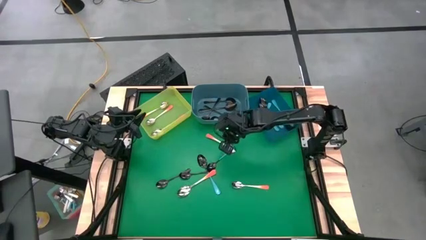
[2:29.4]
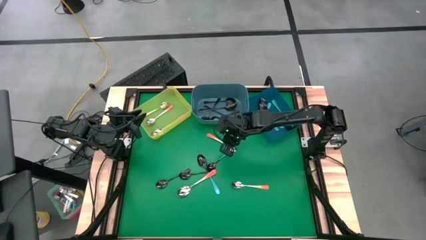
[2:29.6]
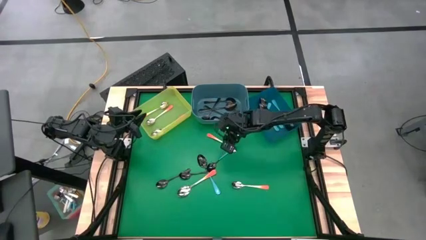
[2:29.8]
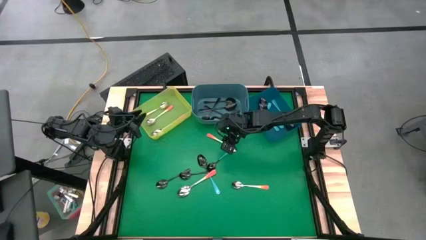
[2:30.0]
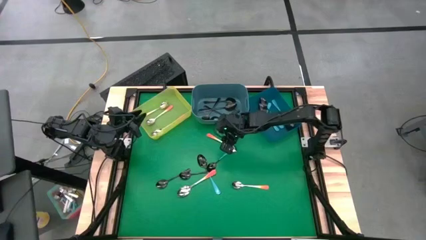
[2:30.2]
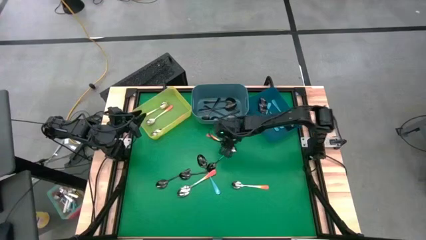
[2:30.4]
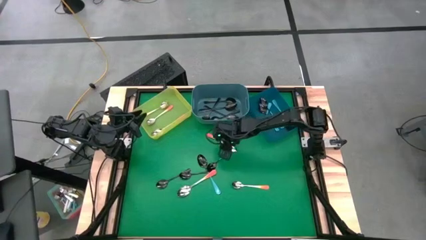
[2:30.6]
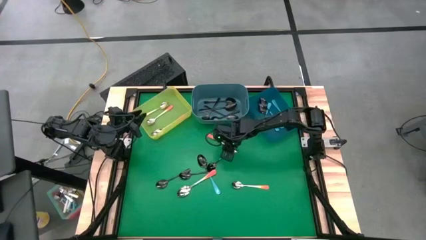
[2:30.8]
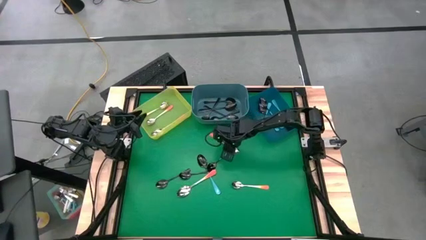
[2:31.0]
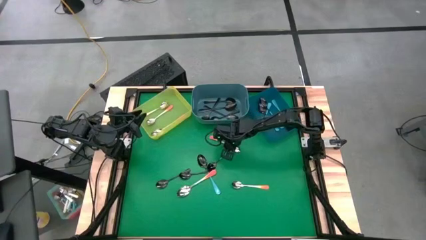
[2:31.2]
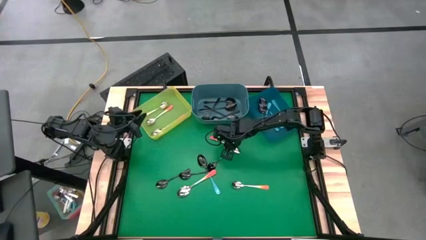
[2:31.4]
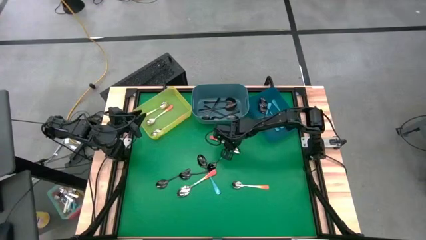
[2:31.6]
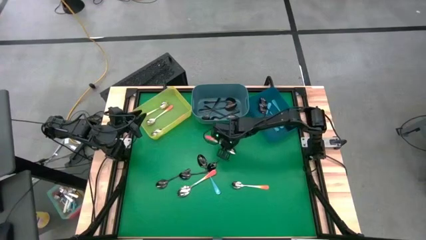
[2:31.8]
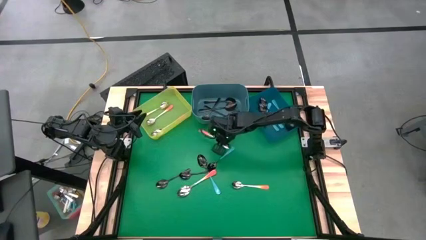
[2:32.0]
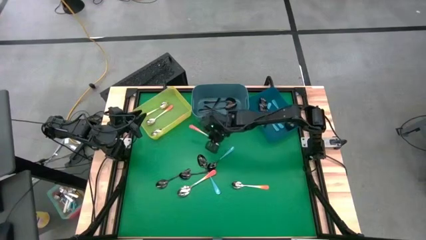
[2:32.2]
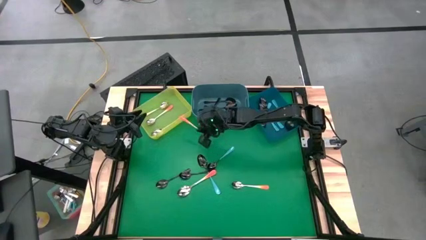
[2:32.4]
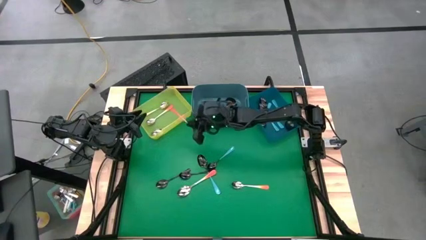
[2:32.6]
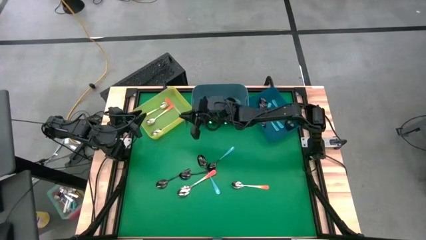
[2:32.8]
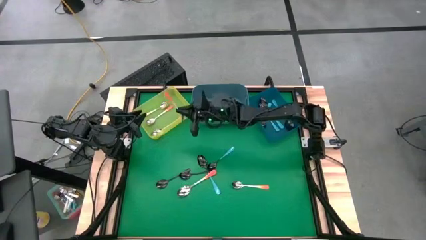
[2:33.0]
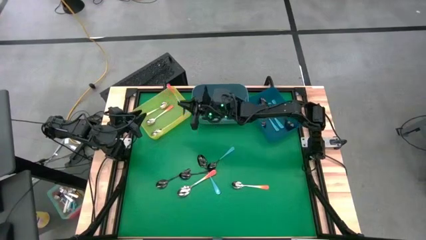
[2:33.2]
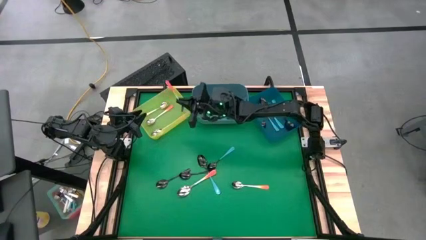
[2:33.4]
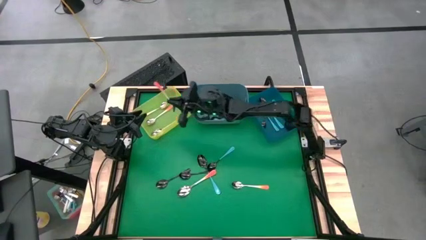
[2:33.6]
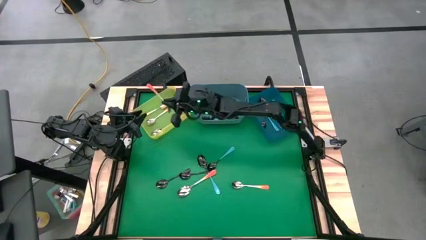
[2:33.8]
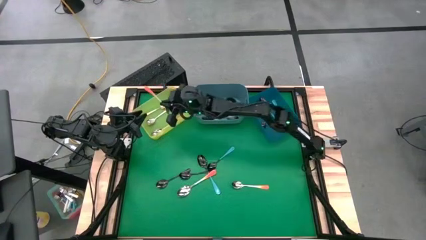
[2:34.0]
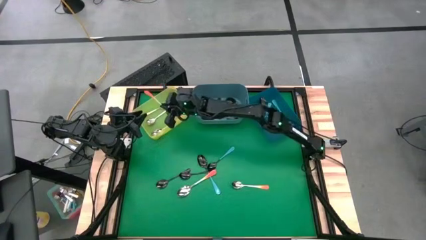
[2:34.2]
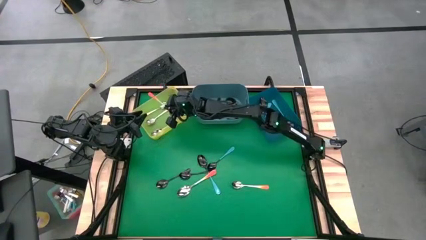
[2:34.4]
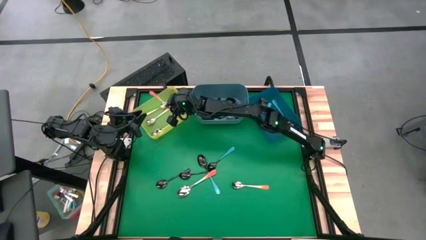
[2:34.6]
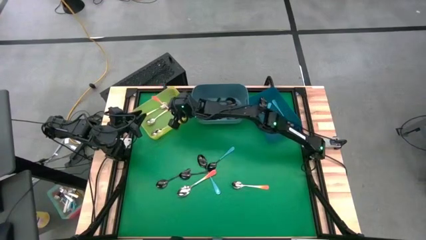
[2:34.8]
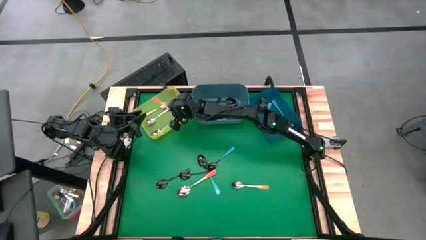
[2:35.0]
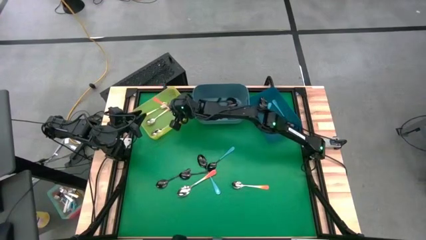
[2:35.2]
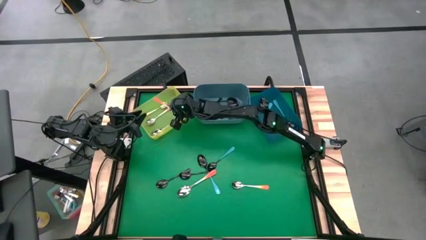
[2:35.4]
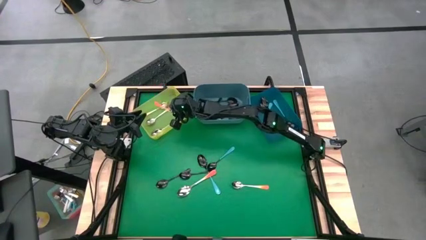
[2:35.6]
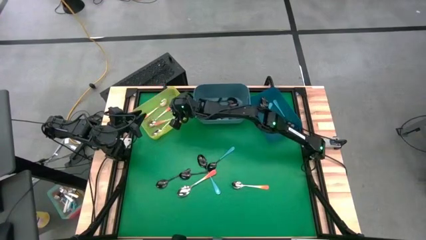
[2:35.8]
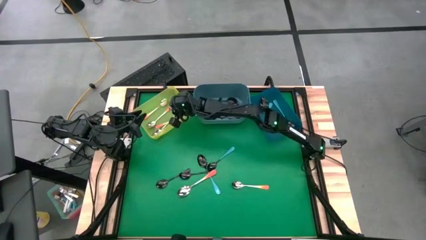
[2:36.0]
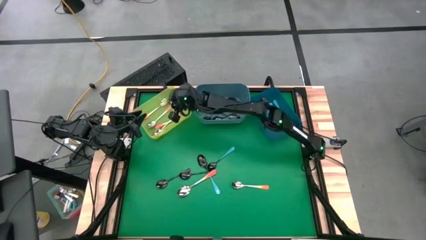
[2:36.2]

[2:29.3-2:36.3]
Task: Sort silverware by color (type)
Put the orange spoon into the yellow bin

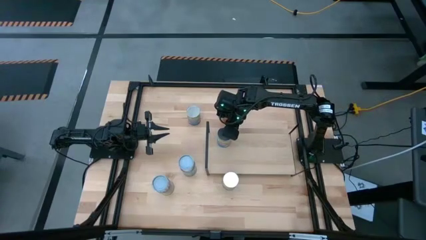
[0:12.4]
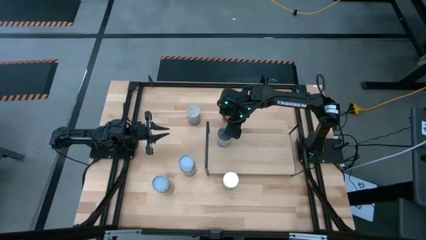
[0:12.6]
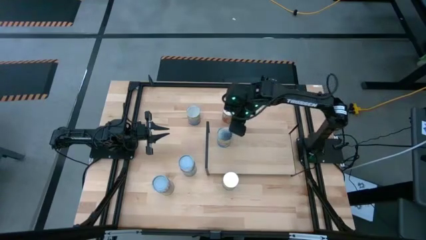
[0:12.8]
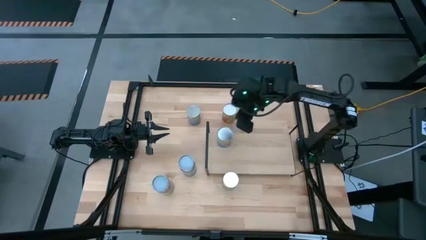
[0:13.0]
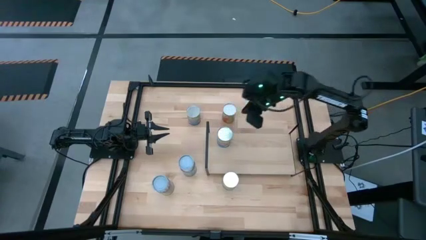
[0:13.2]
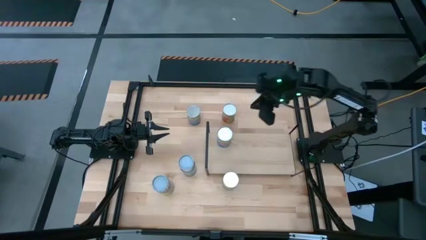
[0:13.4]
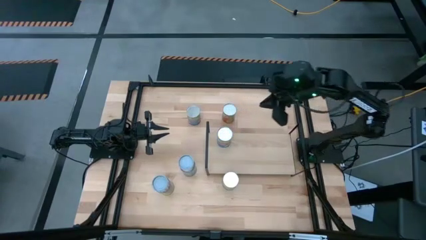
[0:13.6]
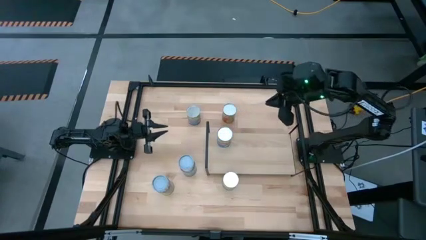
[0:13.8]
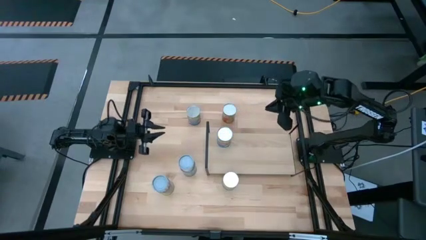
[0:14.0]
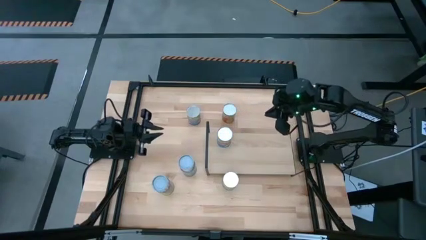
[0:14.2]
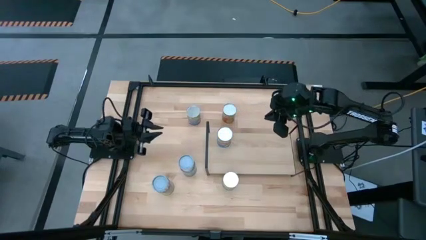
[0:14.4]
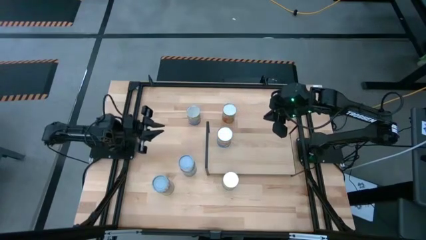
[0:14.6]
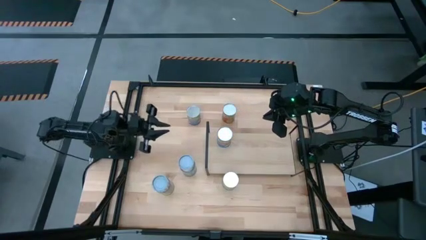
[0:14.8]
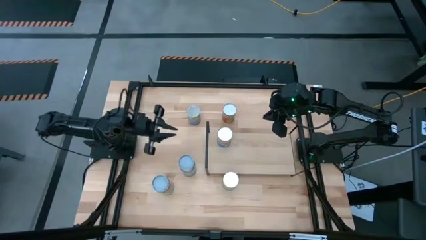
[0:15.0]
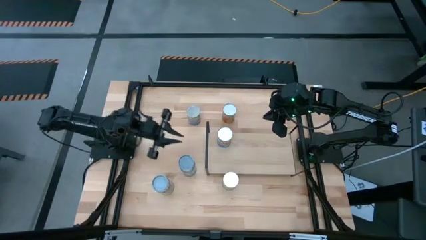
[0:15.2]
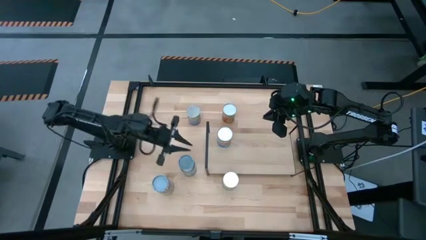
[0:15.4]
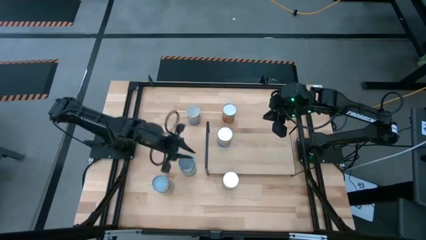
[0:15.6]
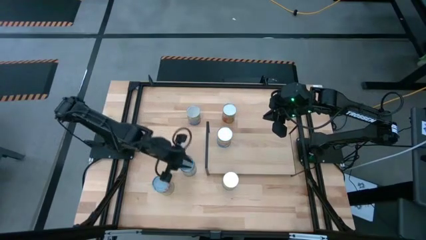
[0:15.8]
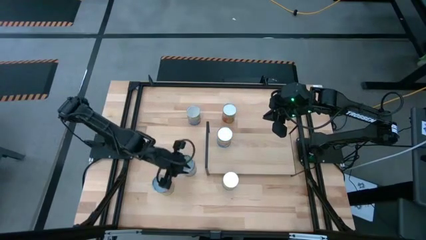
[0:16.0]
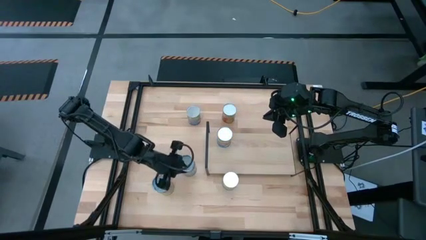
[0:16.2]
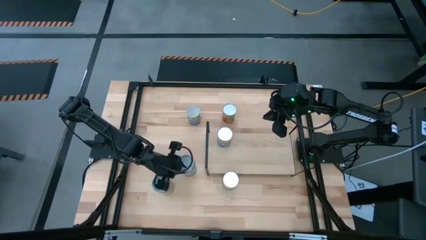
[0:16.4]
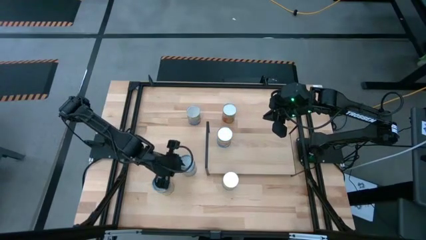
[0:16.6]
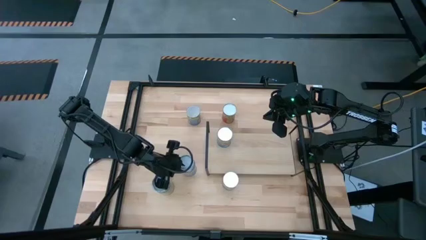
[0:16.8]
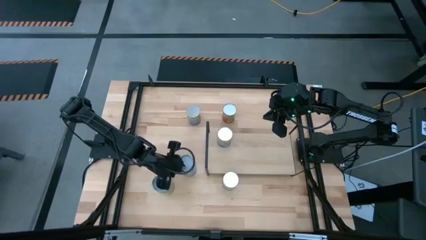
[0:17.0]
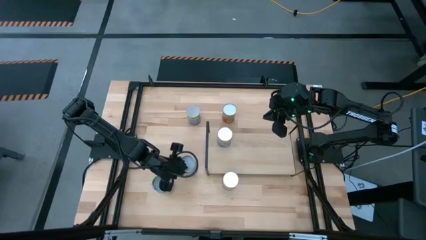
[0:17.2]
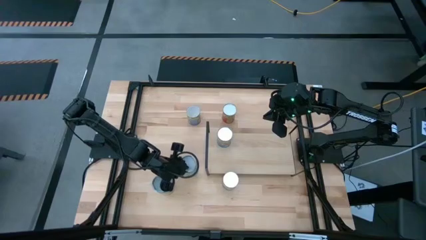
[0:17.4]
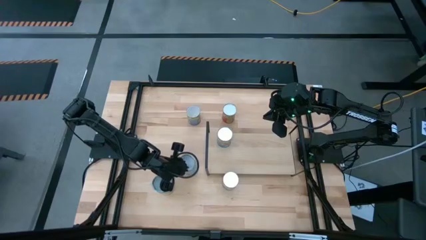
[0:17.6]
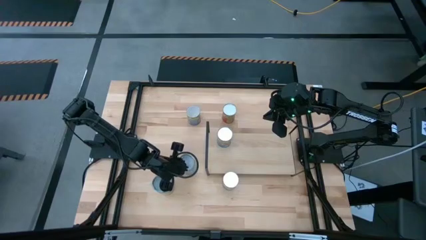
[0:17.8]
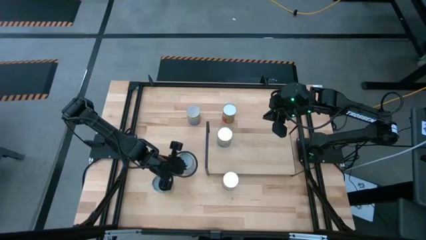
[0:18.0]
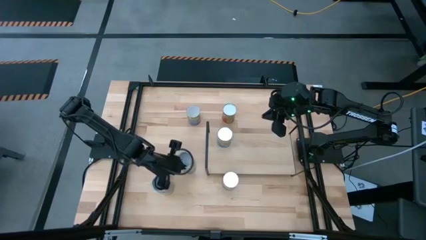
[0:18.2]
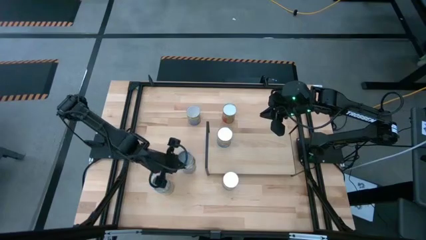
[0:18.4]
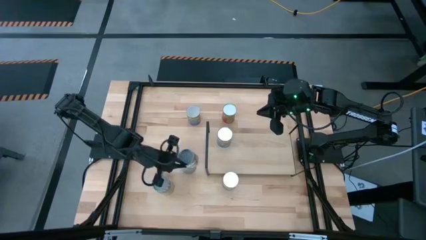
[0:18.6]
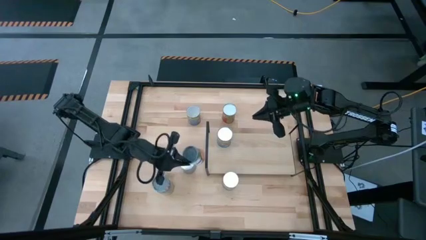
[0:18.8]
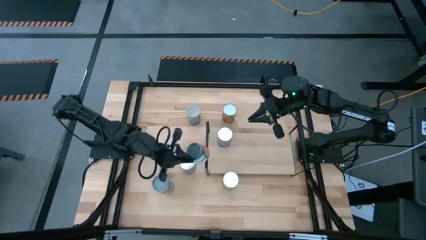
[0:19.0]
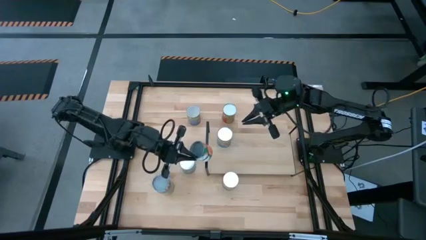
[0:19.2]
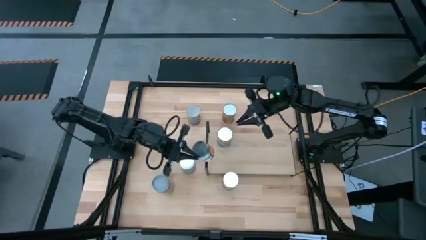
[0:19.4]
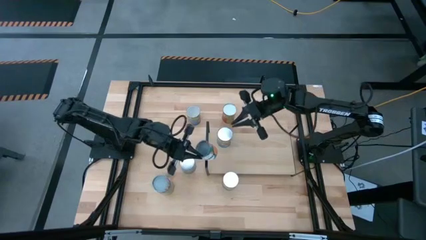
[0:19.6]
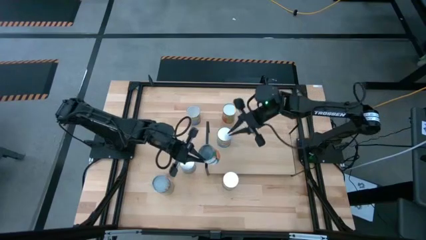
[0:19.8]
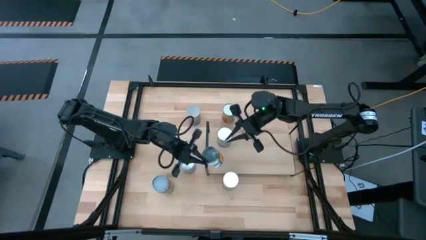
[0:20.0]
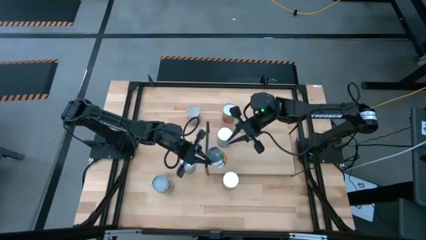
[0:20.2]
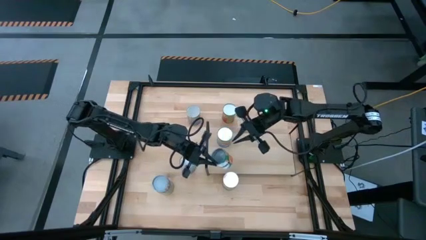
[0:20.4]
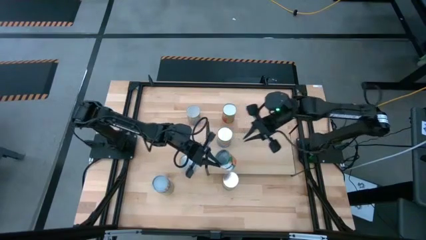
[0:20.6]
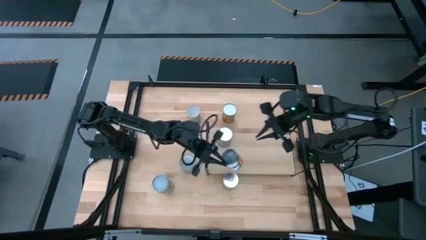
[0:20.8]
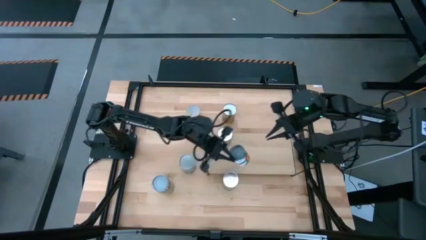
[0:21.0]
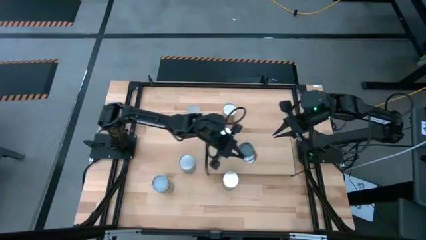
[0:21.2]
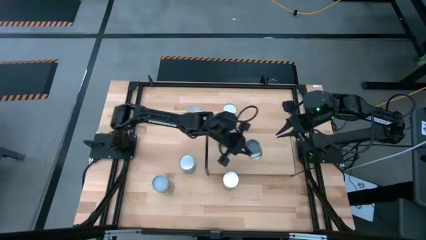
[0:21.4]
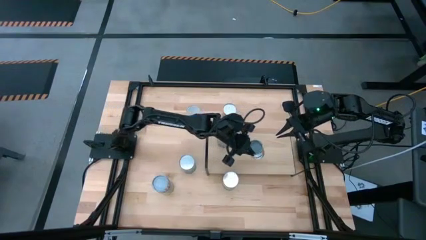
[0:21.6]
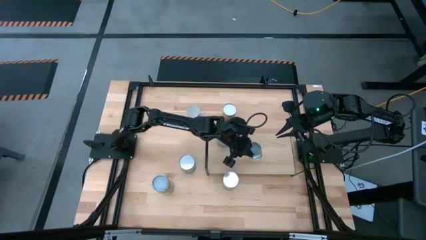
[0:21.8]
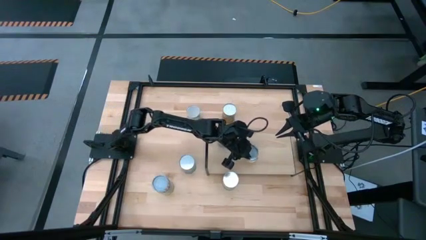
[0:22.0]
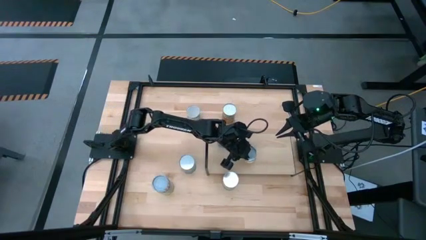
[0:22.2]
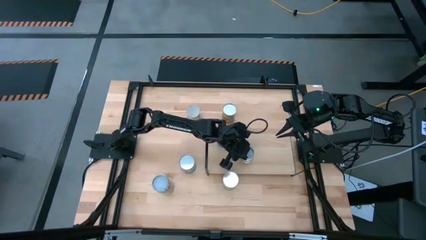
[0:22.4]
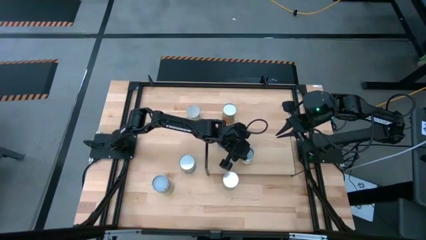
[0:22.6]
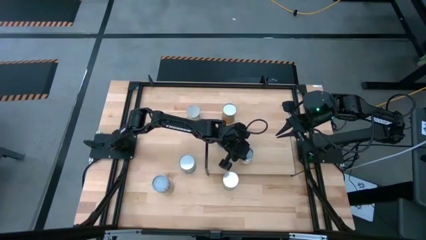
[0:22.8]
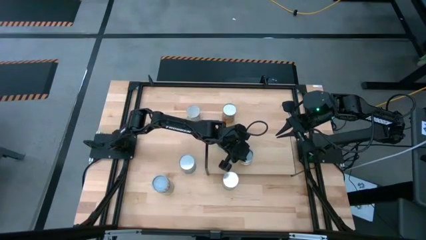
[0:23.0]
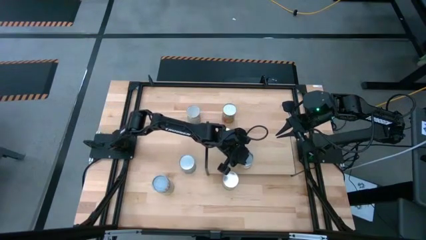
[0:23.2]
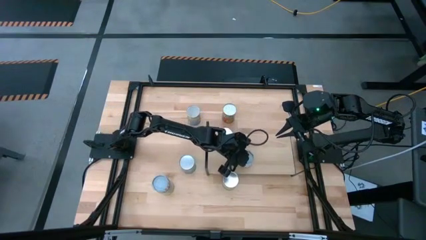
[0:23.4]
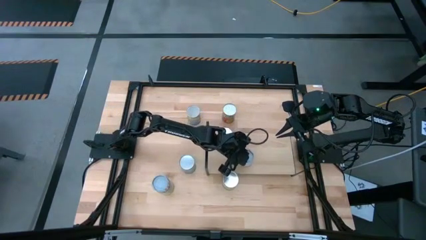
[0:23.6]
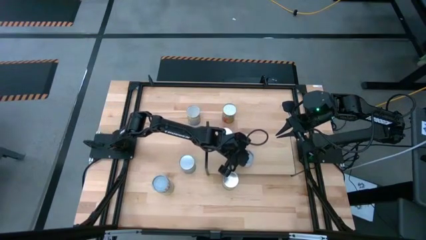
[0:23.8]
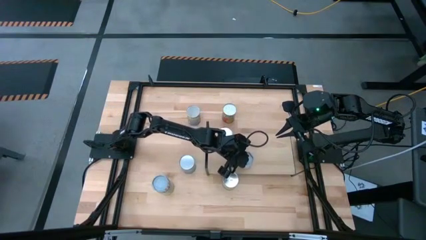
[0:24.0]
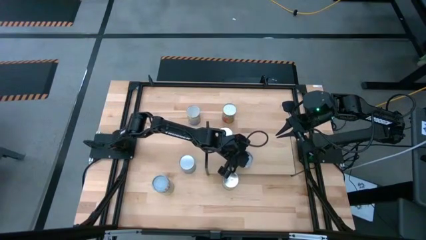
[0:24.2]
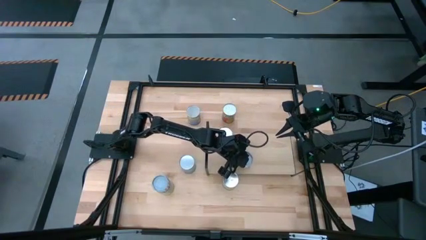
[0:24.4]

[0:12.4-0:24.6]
Task: Pick and place cans onto a shelf
Put the small canned oranges on the shelf
